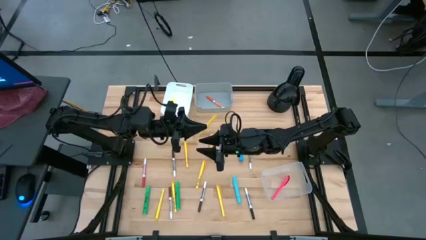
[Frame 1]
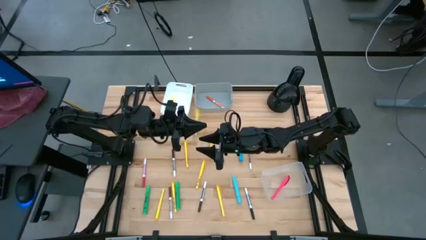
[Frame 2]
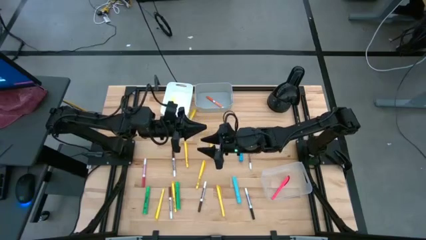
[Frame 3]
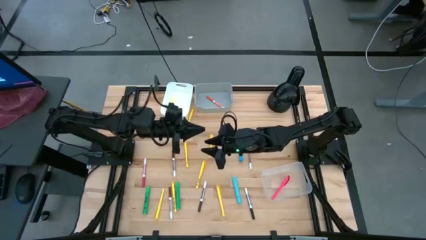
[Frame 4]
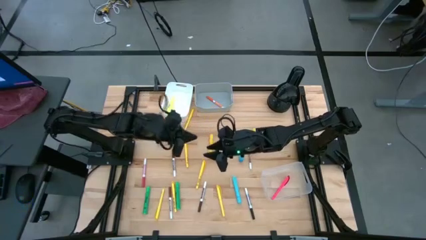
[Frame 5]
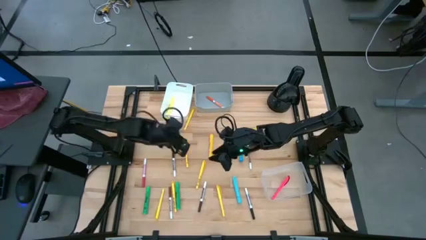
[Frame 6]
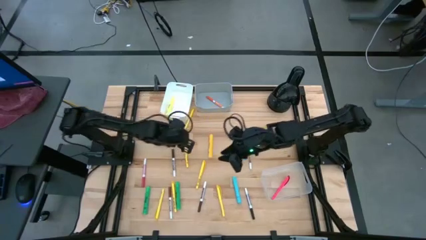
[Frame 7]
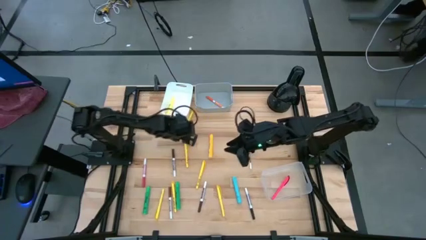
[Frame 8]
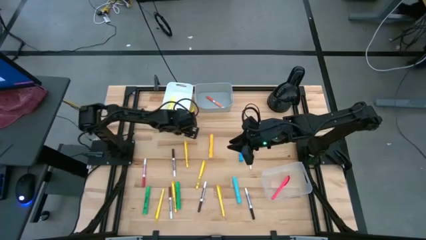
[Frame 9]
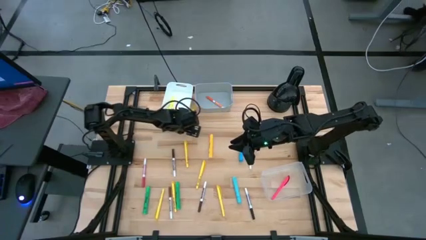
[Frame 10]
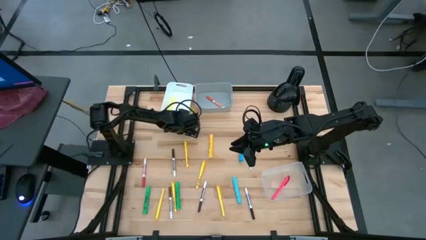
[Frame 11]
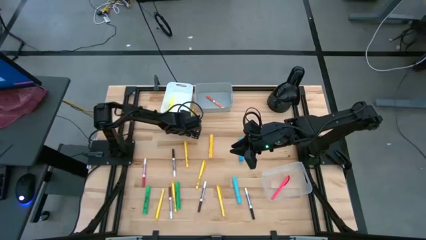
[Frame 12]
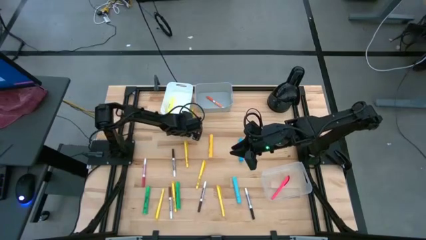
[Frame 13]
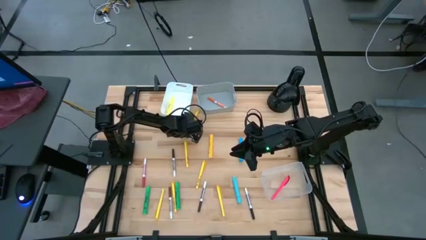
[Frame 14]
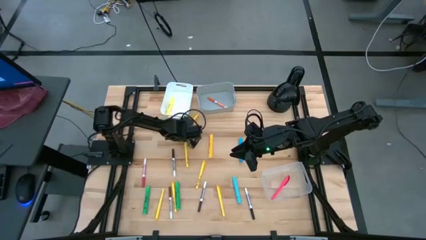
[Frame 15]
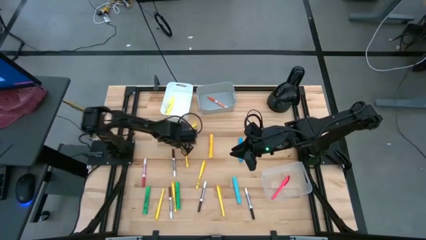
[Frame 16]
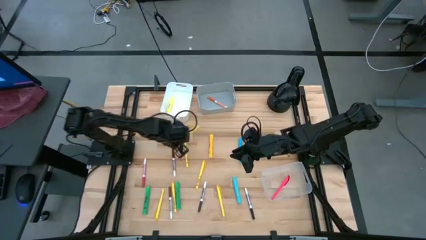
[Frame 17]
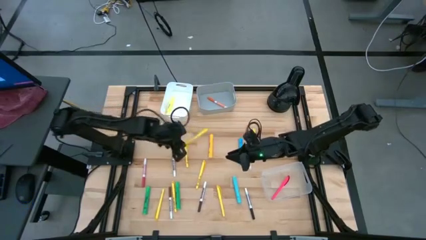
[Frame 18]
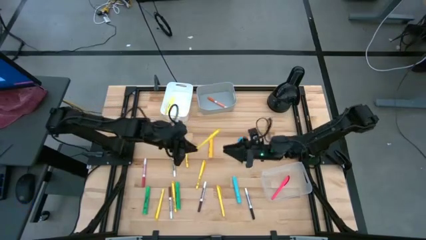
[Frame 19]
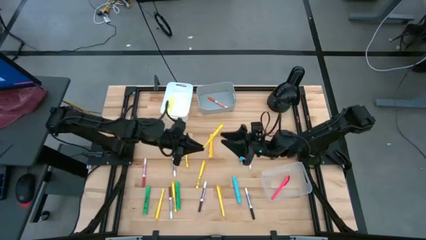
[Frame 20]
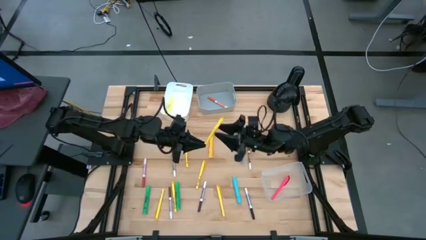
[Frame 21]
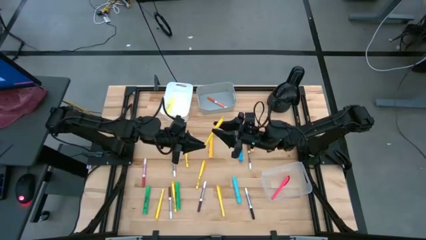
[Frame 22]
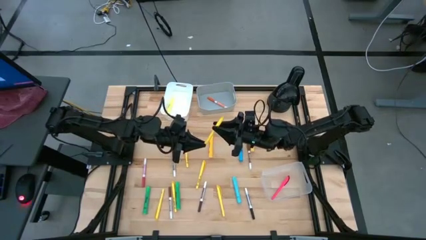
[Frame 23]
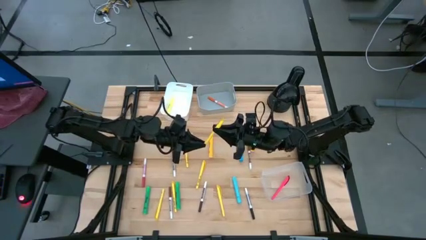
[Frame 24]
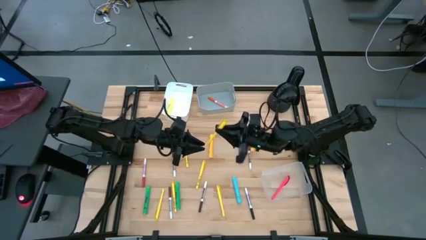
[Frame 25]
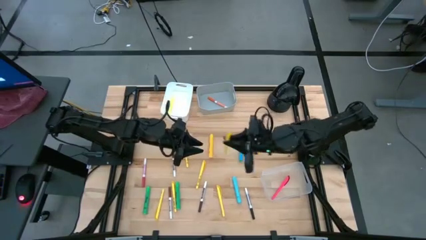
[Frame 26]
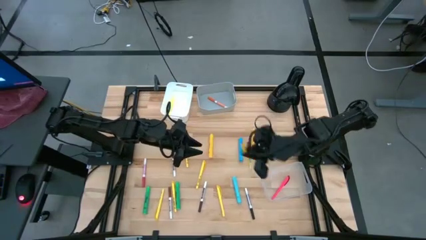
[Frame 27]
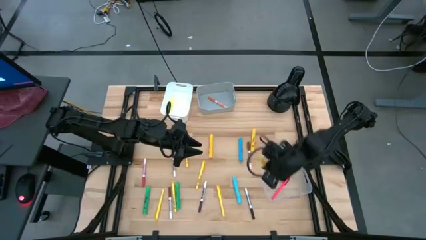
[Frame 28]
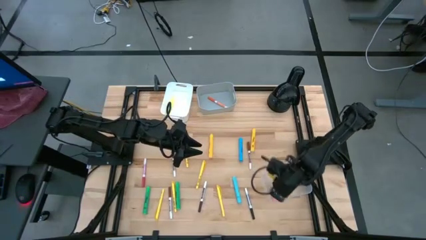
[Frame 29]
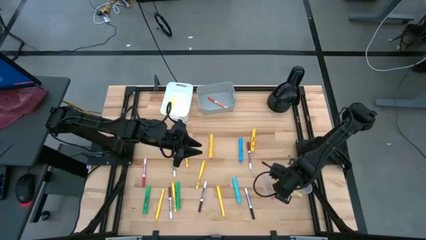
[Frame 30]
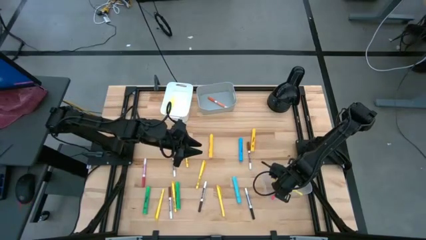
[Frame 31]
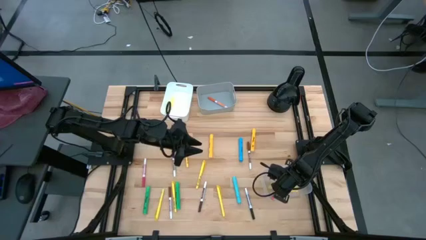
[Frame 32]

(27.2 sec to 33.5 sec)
Task: Pick & Place Markers
Put the yellow pen into the transparent bin

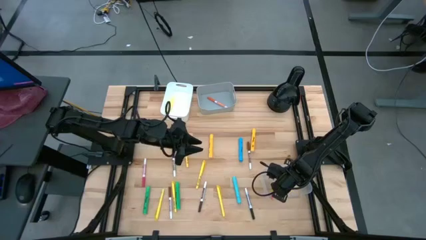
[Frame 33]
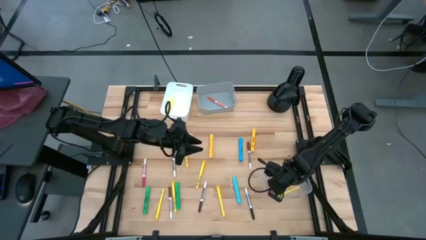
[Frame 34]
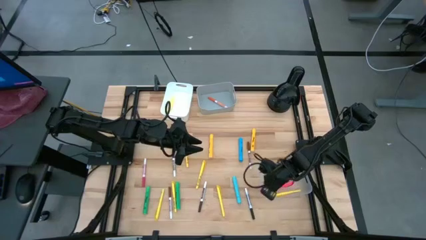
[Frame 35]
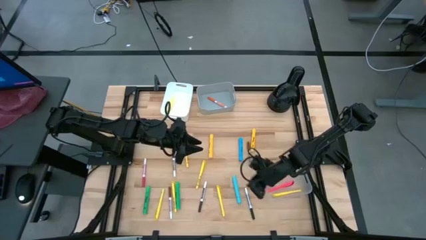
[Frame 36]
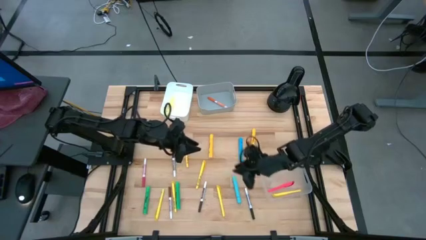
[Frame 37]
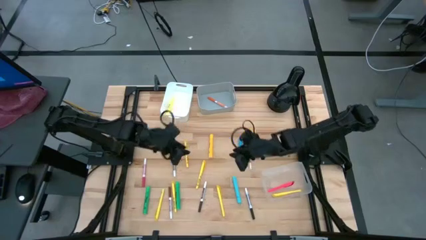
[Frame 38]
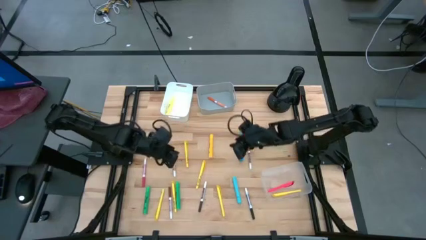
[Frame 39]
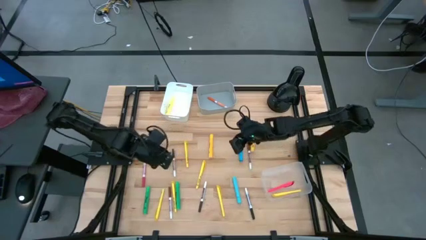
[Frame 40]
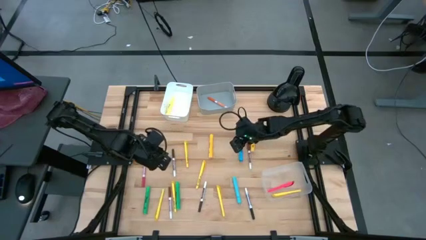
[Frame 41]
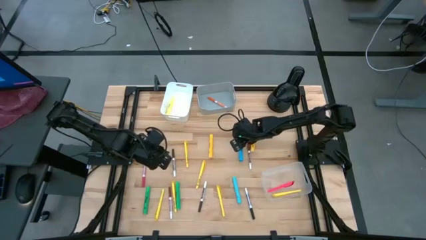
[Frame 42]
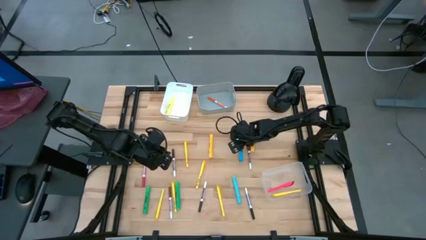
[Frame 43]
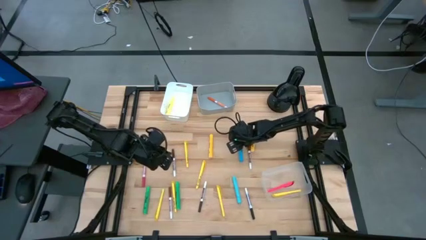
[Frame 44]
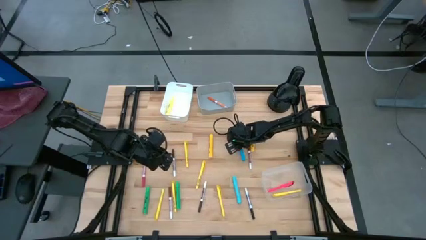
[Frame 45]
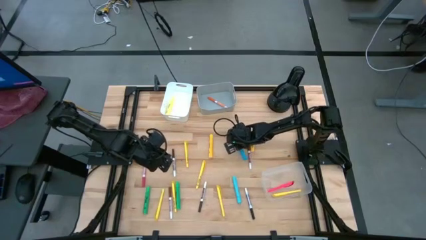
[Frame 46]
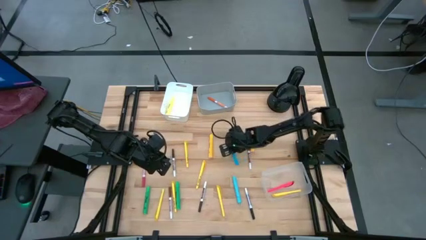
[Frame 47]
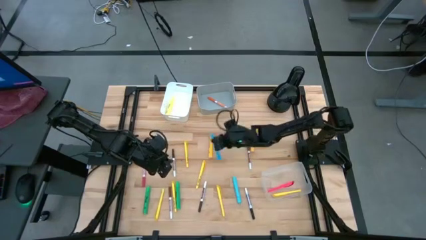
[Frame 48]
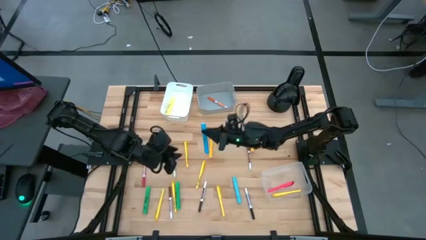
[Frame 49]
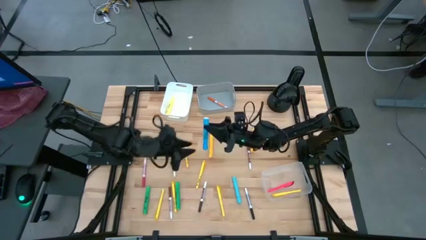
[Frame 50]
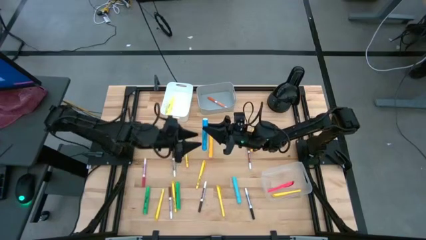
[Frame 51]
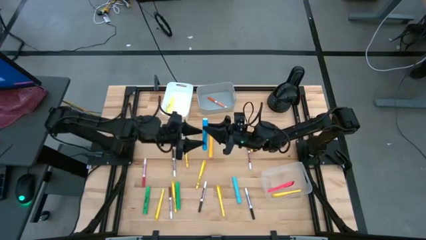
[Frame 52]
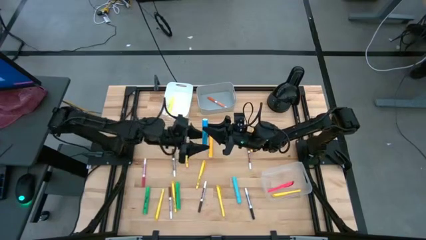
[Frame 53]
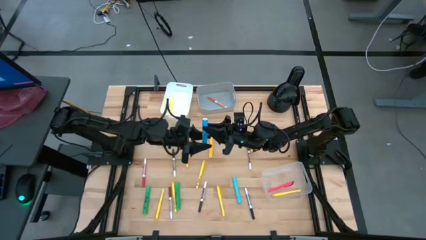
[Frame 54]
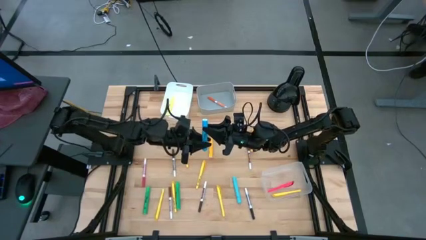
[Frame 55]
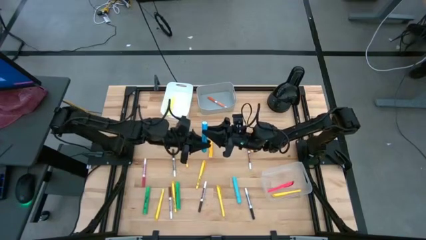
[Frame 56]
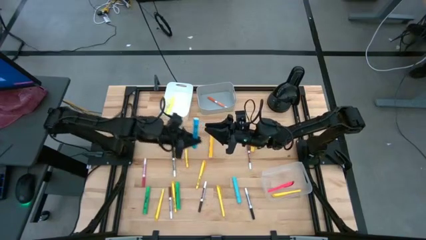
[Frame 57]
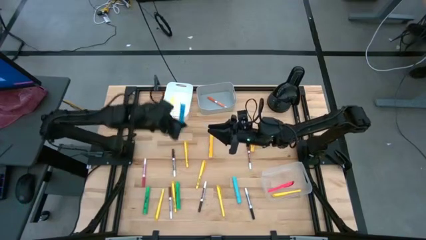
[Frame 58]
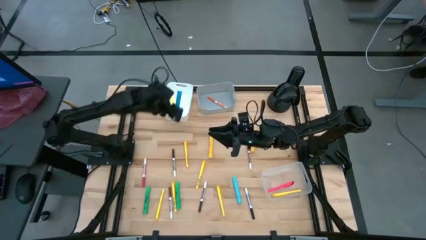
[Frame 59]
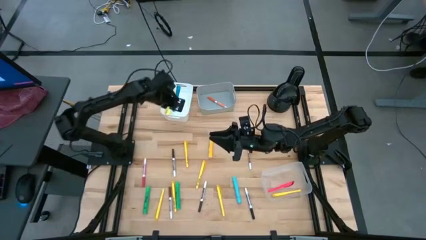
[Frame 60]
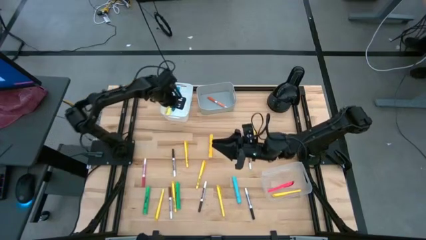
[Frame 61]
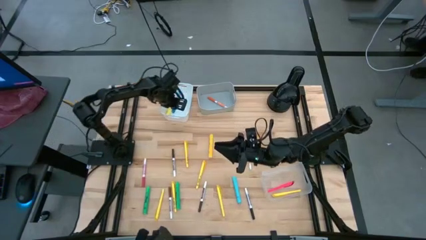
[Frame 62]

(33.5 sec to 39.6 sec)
Put the blue highlighter pen into the white bin

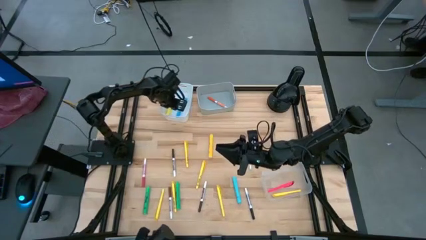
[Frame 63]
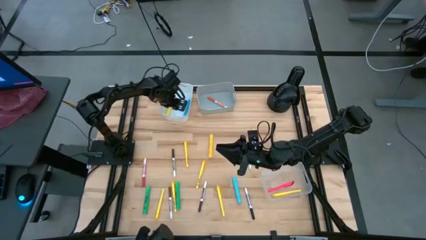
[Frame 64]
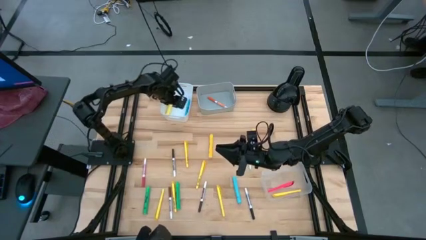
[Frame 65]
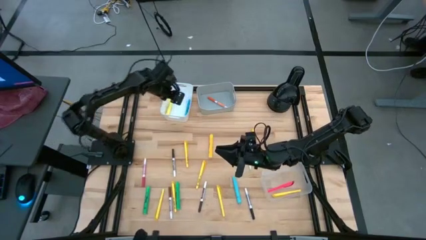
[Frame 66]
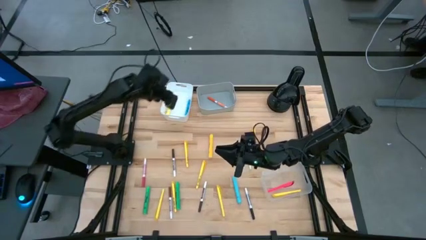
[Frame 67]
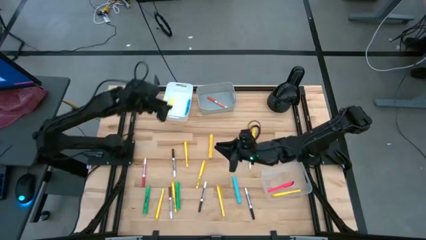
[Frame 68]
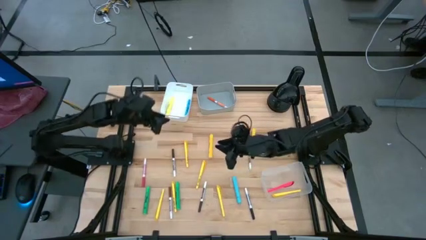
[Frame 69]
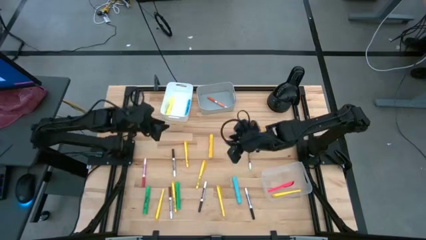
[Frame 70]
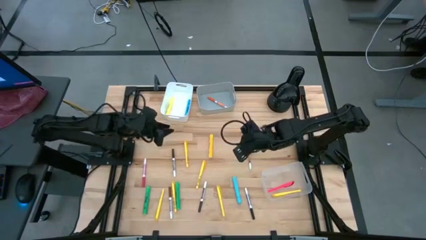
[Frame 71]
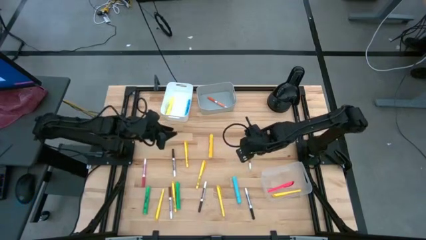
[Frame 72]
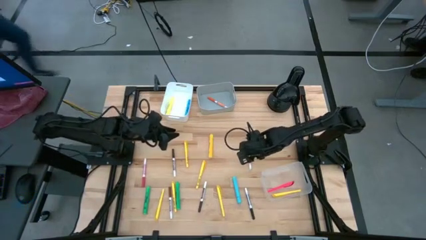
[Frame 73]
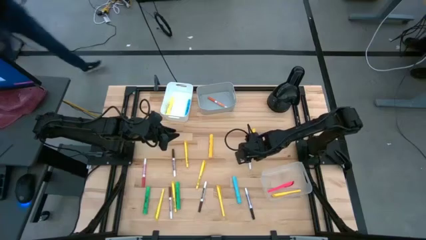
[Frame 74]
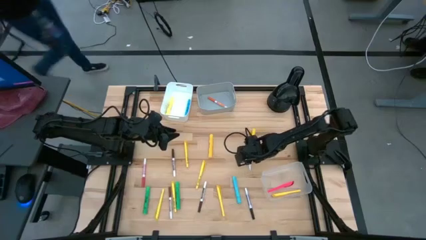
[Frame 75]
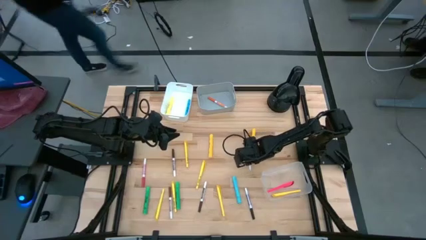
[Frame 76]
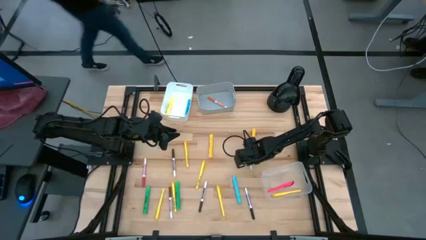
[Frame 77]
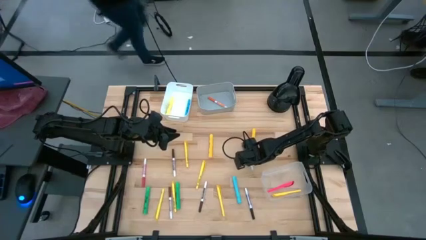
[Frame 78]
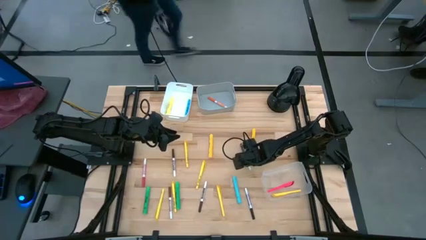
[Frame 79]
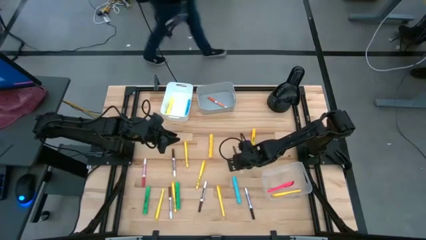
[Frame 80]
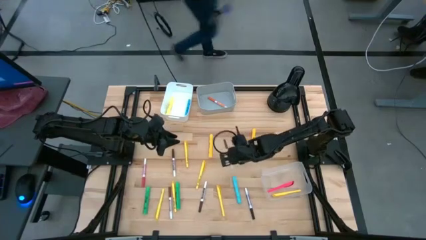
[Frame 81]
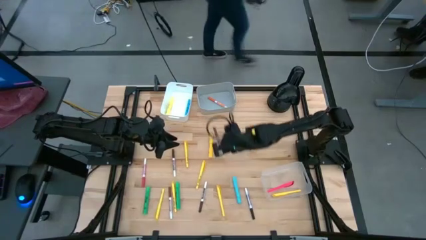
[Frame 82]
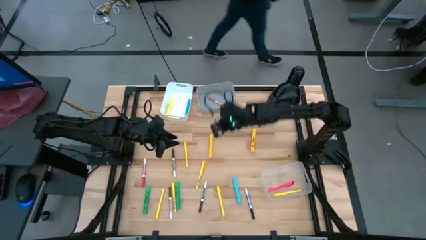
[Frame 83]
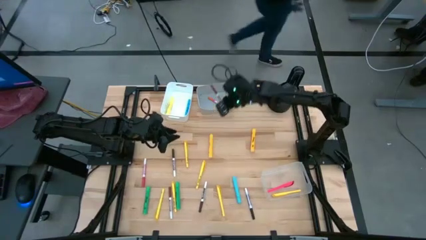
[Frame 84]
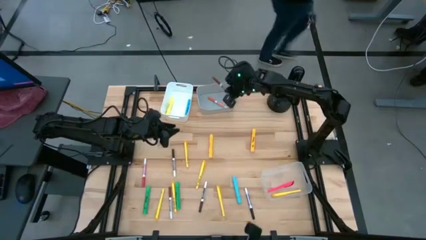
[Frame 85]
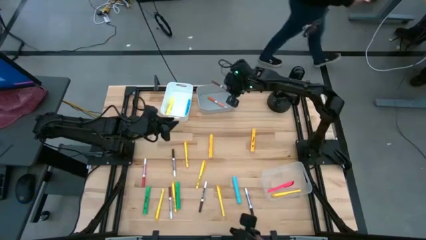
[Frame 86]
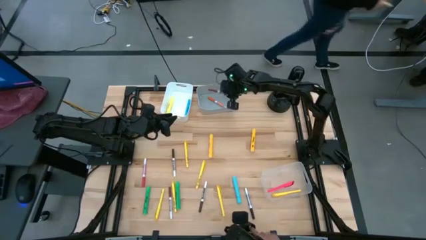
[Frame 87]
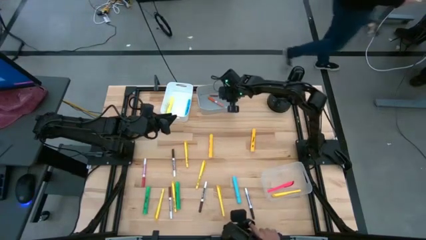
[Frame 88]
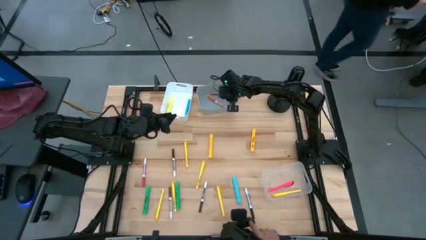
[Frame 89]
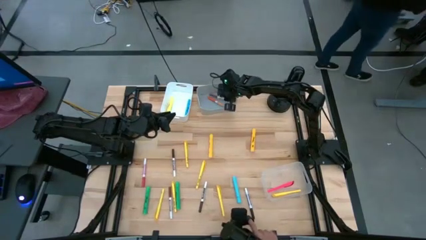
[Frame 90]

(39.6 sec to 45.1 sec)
Put the brown marker pen into the gray bin
